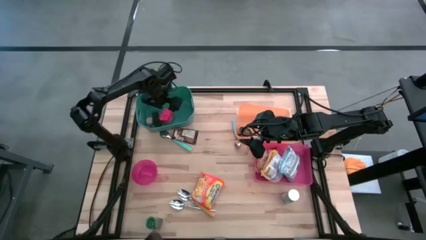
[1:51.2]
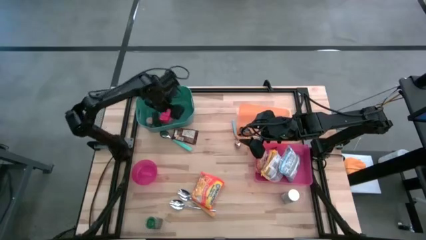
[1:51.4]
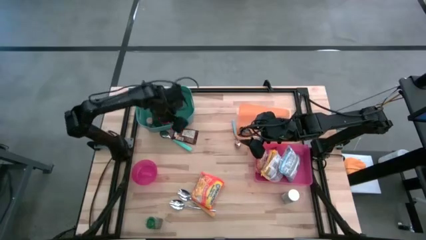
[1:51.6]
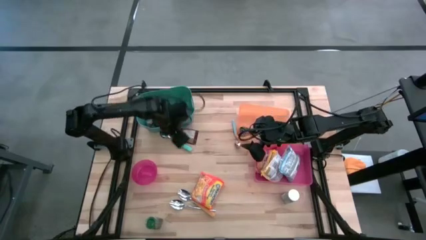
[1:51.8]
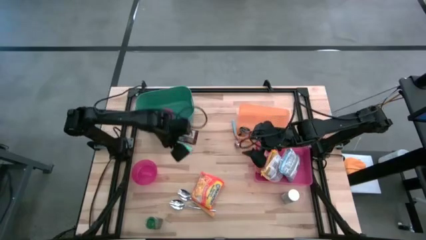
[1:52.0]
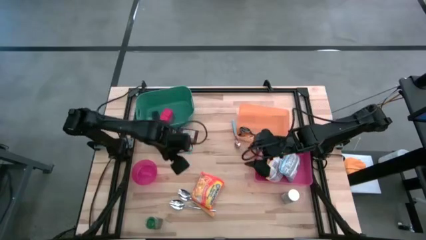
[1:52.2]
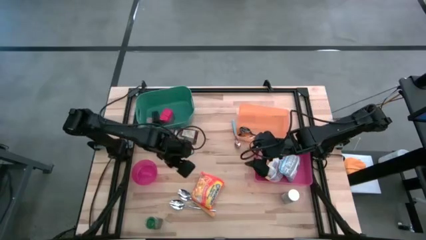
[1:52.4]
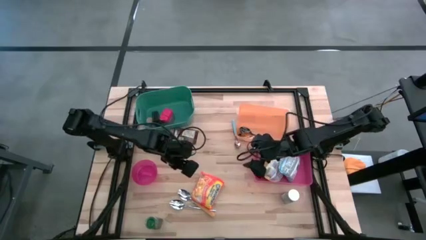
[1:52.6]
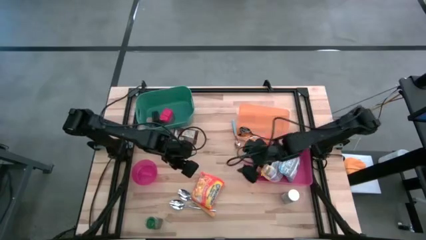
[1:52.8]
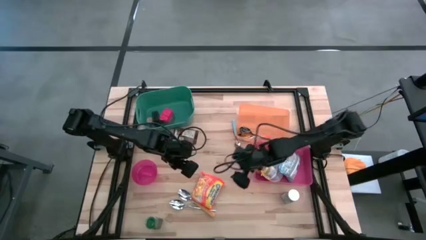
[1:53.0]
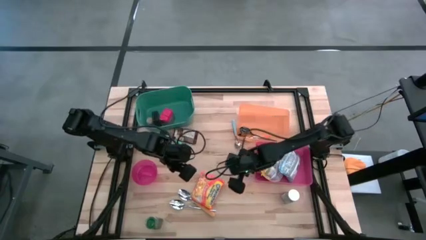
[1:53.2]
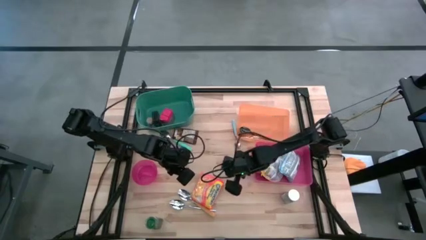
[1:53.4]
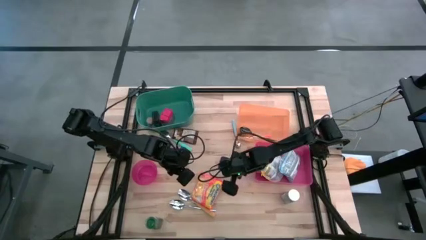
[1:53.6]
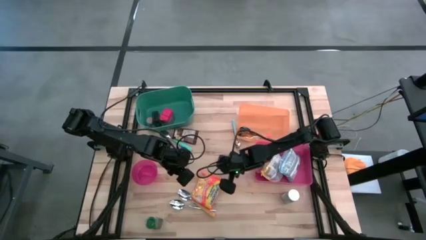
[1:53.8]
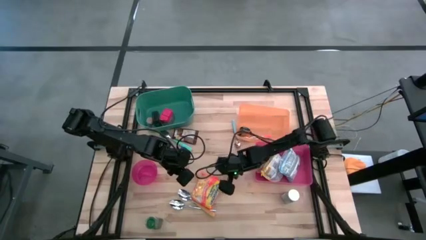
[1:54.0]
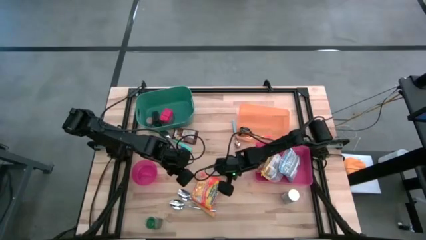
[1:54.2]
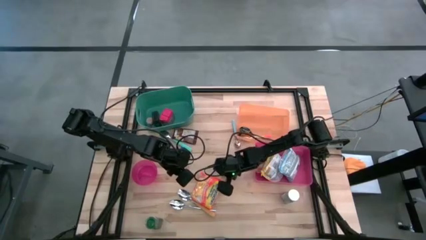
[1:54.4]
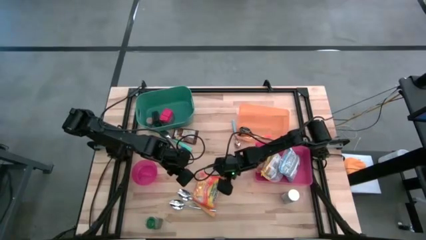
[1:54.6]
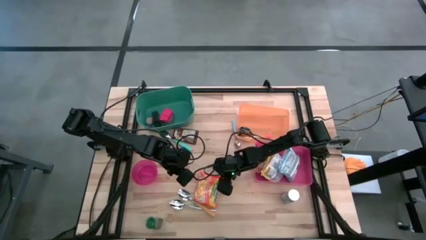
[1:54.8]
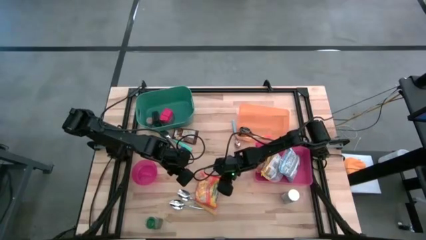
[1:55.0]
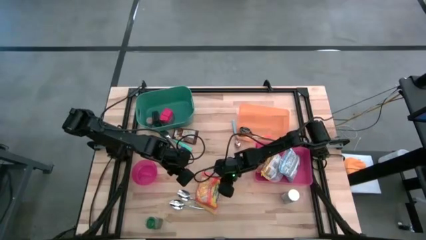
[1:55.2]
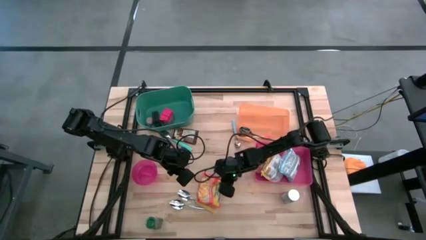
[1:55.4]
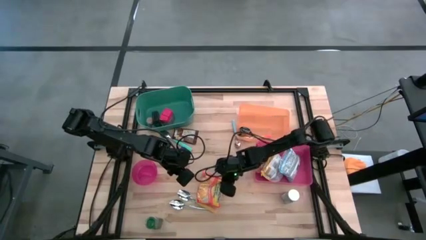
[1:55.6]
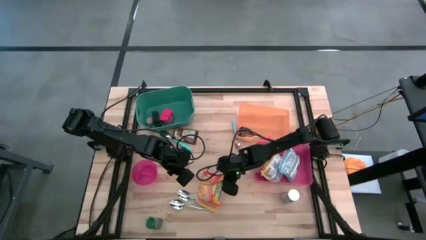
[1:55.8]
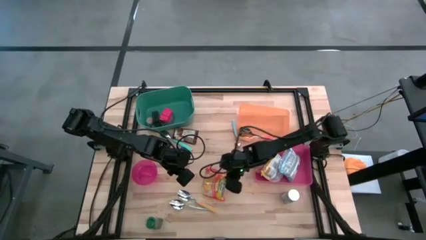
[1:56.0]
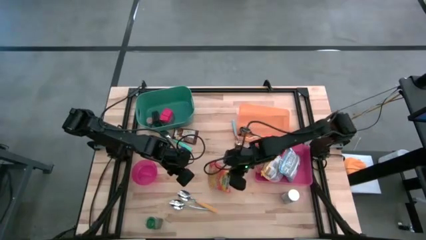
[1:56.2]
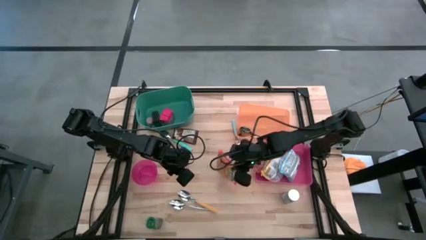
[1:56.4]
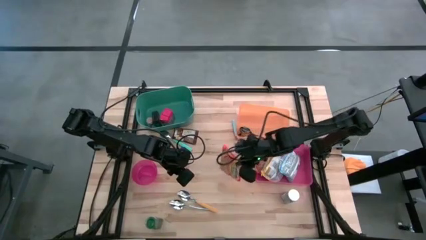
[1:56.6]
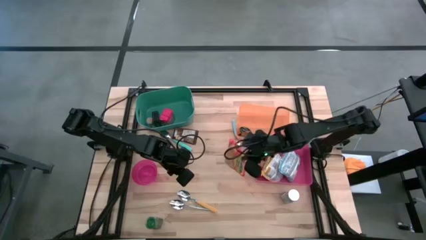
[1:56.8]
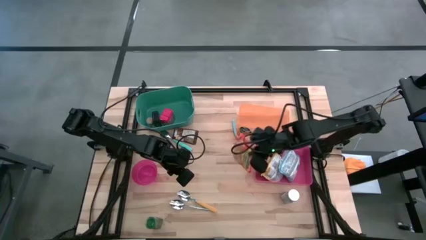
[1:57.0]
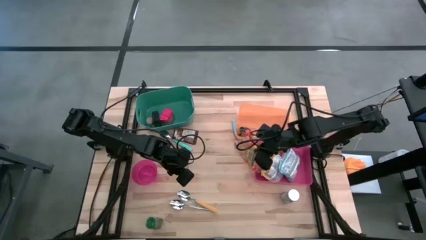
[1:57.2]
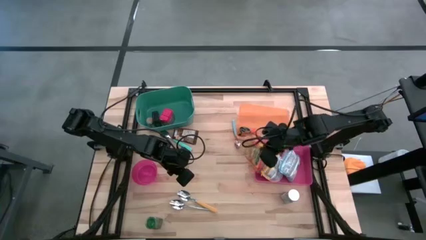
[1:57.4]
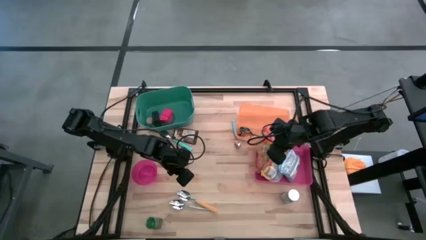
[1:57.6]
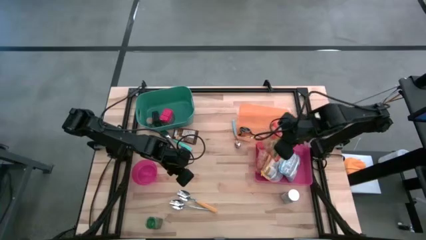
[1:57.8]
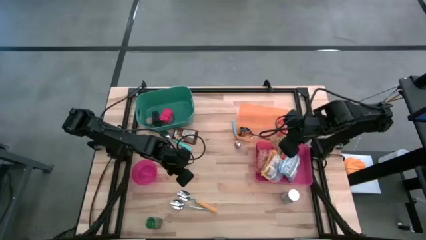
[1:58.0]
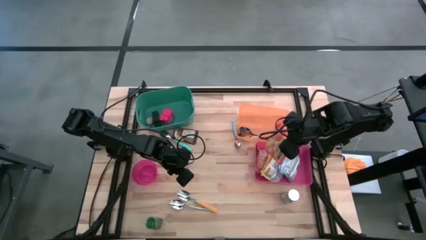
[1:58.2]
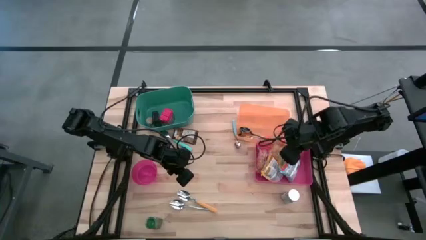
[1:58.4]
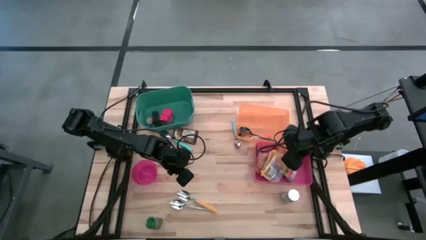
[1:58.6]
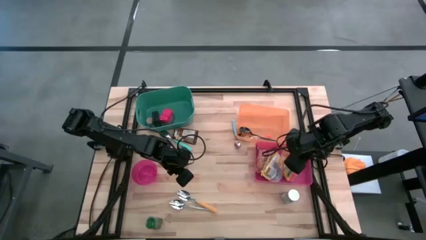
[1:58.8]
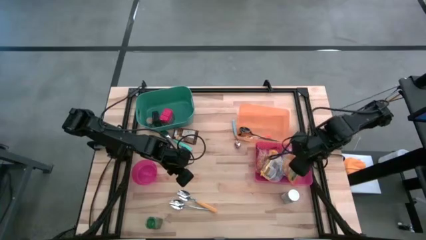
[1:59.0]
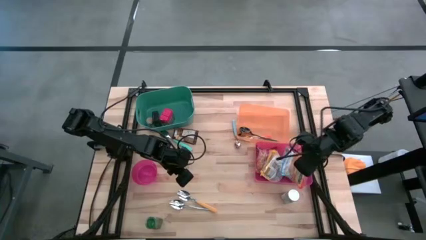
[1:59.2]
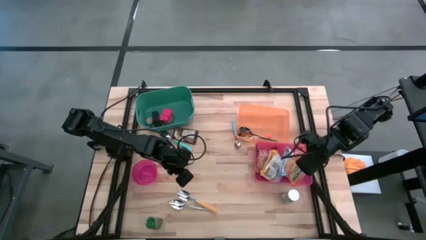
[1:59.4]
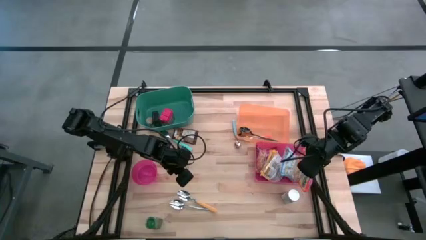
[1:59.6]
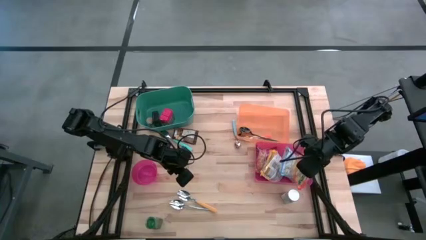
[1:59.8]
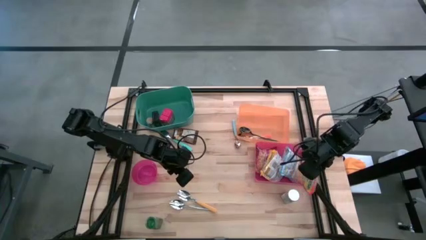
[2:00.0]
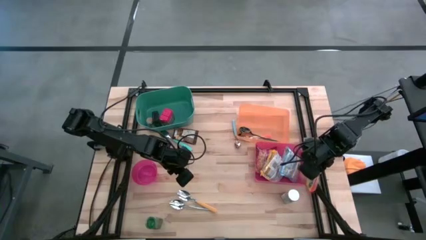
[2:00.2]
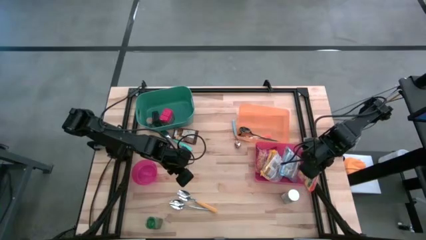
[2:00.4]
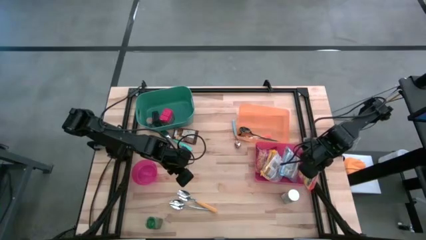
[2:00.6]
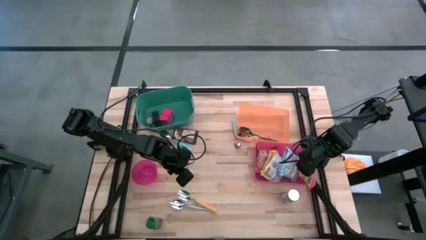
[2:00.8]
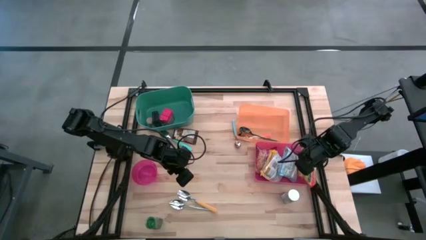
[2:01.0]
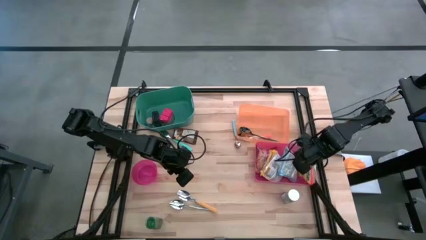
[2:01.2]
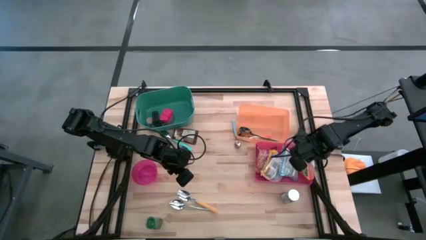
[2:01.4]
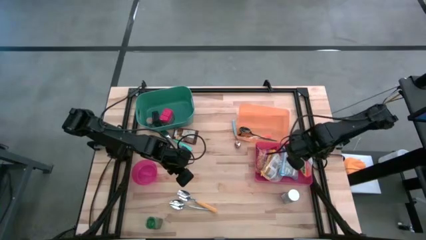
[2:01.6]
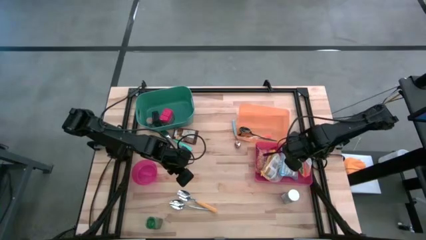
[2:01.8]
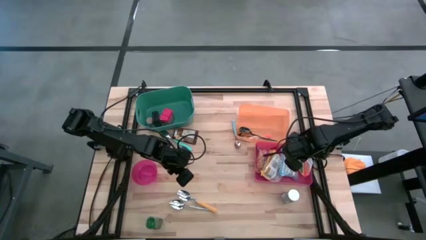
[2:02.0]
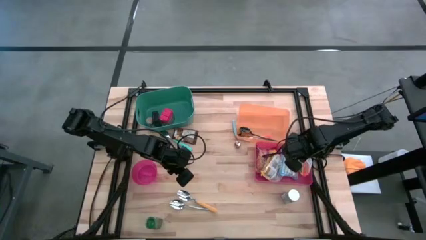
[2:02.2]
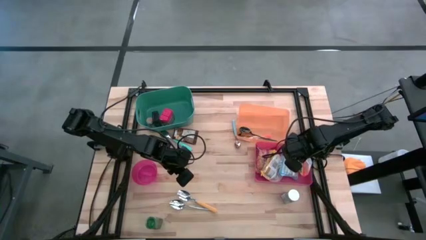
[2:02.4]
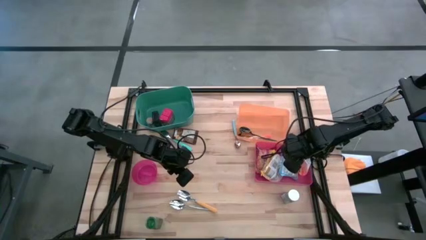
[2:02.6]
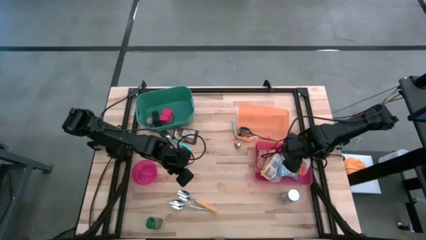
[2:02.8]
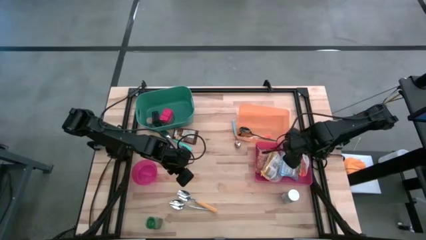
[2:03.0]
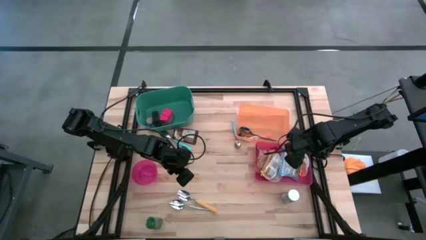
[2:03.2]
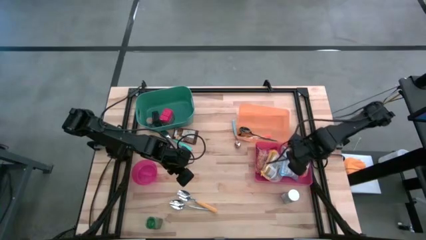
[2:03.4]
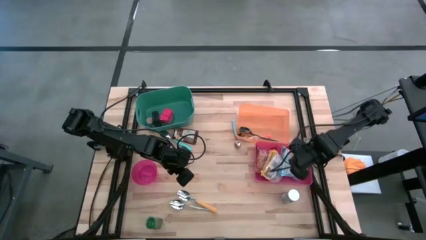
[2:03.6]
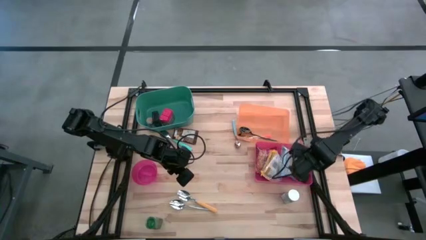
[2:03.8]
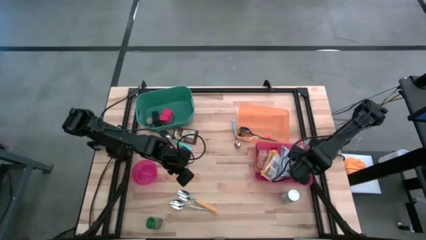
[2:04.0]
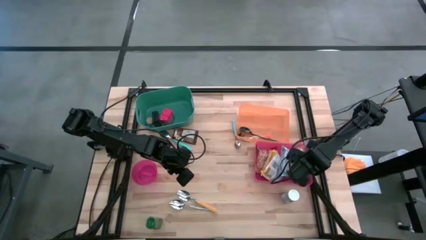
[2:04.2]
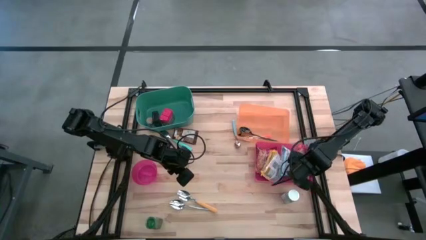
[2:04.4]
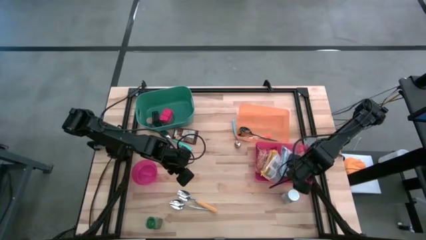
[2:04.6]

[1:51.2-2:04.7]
Put the orange noodle pack into the pink bin
